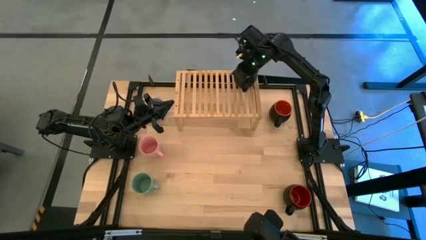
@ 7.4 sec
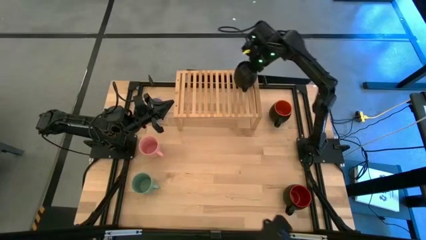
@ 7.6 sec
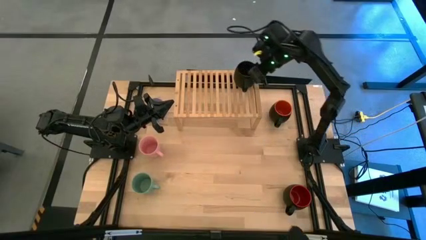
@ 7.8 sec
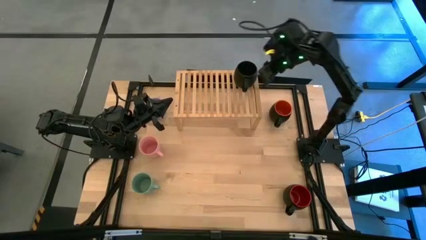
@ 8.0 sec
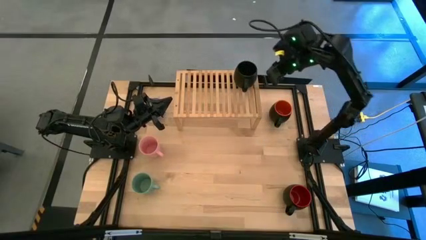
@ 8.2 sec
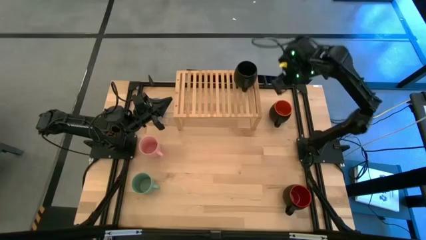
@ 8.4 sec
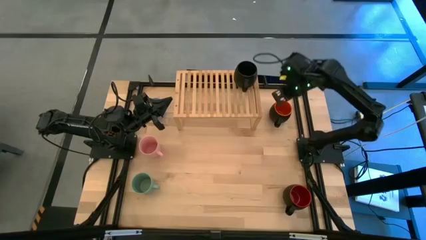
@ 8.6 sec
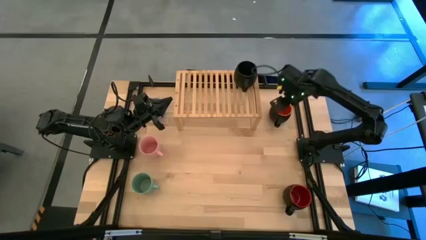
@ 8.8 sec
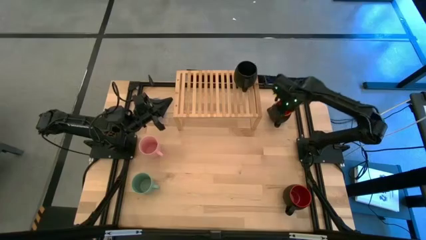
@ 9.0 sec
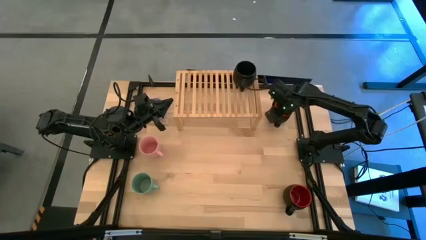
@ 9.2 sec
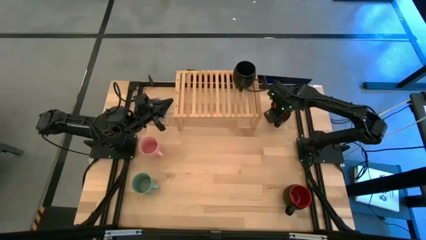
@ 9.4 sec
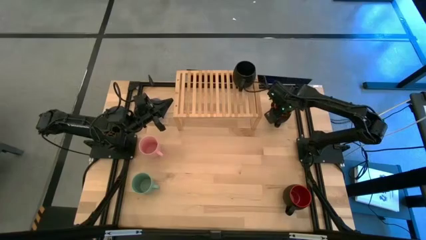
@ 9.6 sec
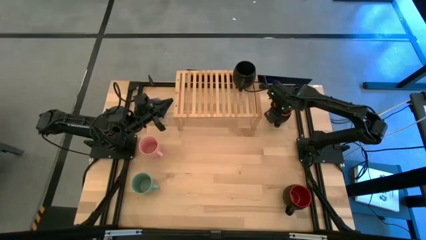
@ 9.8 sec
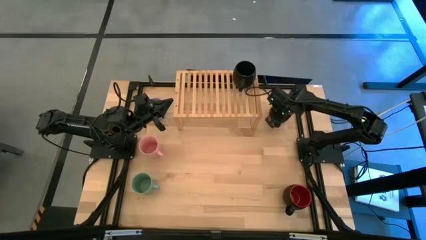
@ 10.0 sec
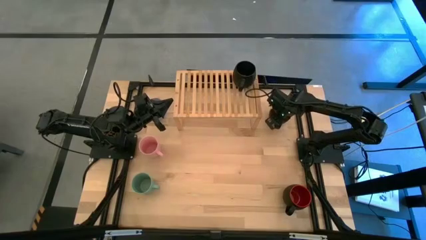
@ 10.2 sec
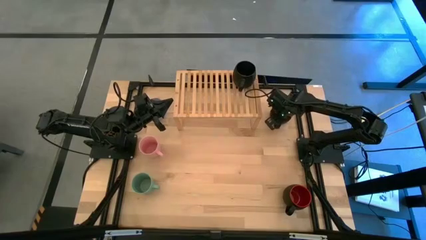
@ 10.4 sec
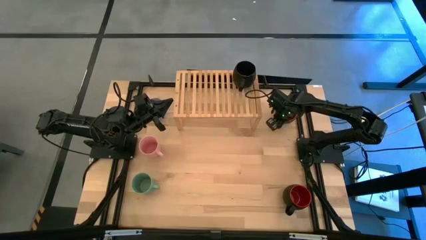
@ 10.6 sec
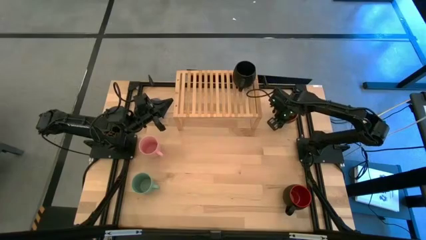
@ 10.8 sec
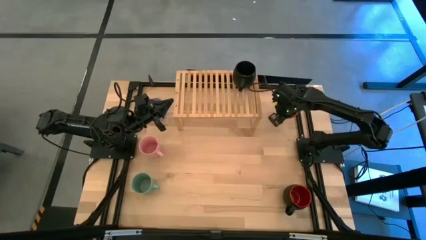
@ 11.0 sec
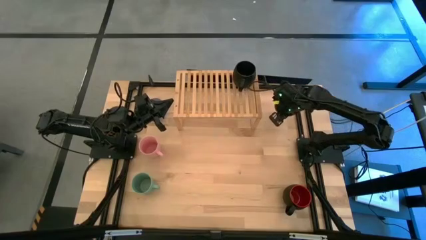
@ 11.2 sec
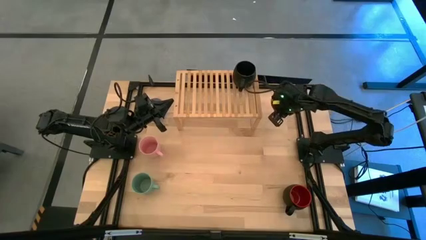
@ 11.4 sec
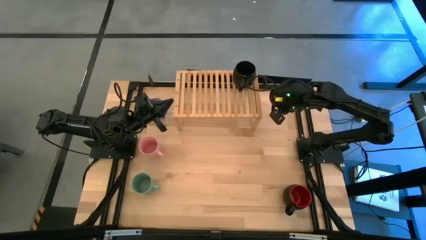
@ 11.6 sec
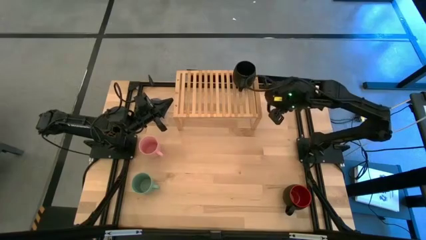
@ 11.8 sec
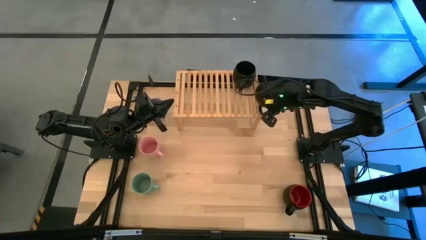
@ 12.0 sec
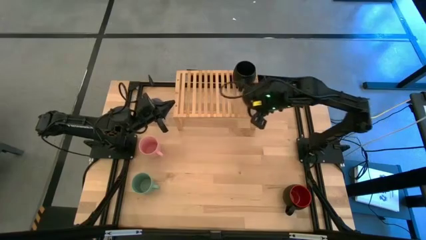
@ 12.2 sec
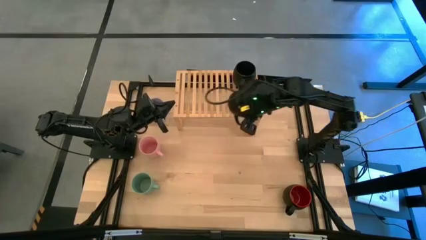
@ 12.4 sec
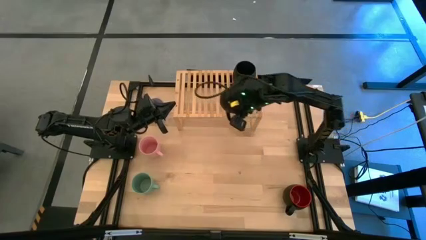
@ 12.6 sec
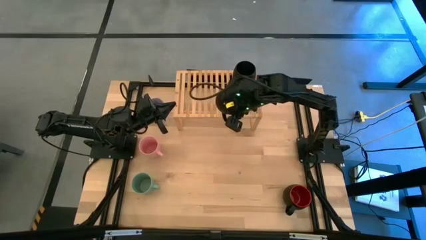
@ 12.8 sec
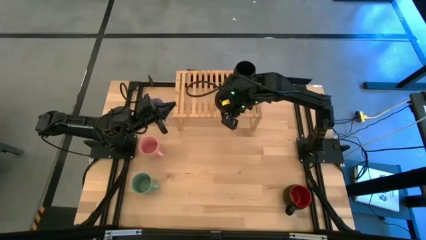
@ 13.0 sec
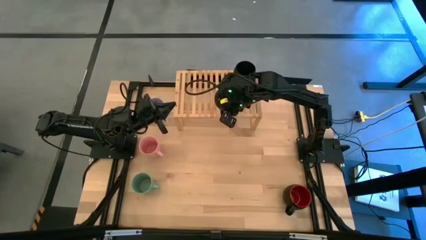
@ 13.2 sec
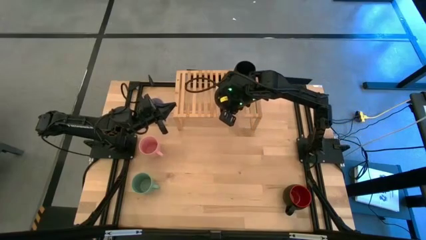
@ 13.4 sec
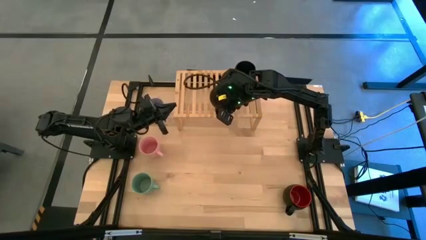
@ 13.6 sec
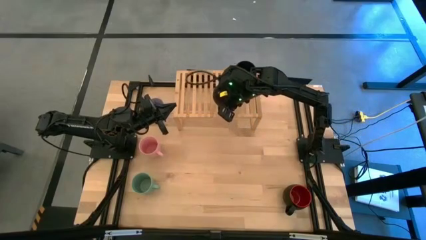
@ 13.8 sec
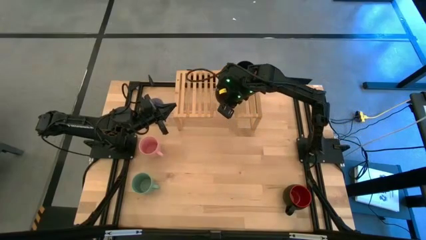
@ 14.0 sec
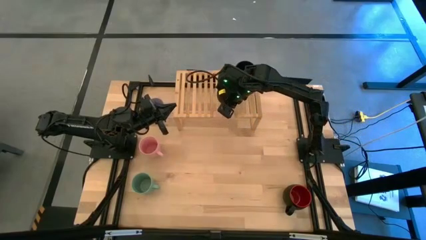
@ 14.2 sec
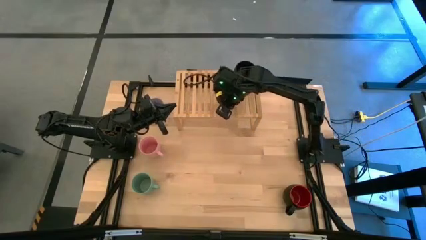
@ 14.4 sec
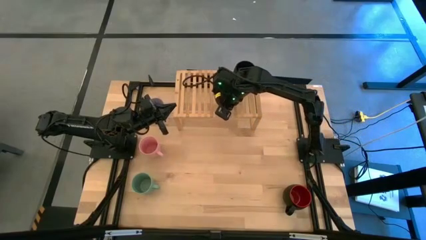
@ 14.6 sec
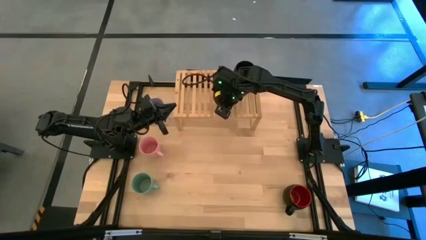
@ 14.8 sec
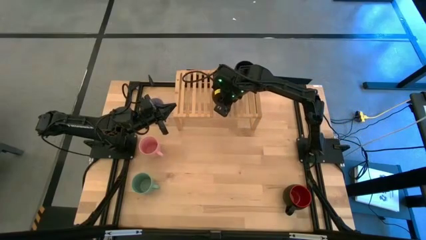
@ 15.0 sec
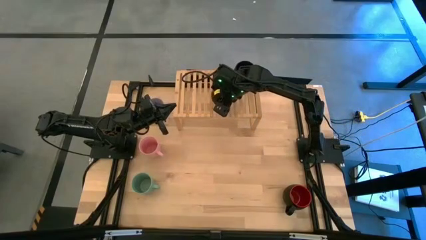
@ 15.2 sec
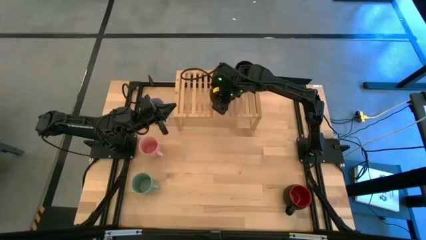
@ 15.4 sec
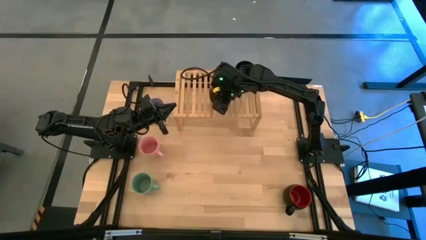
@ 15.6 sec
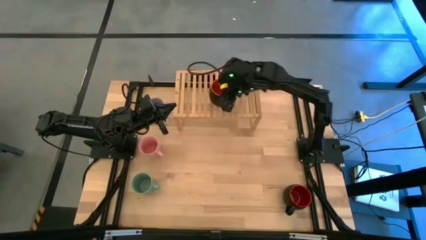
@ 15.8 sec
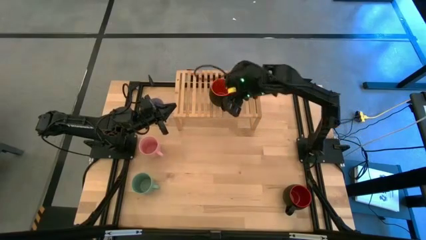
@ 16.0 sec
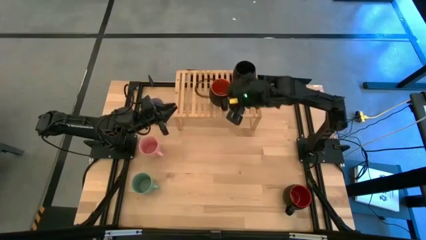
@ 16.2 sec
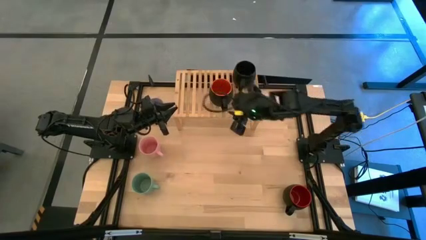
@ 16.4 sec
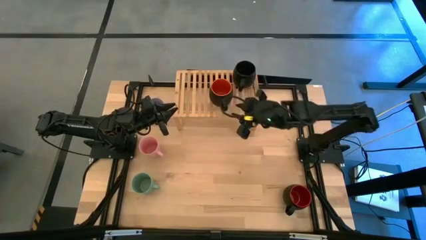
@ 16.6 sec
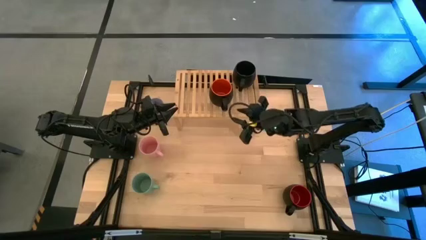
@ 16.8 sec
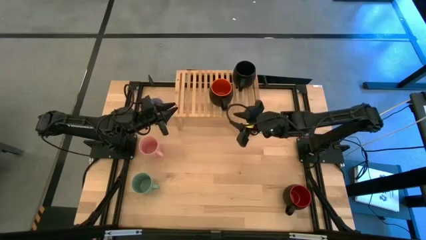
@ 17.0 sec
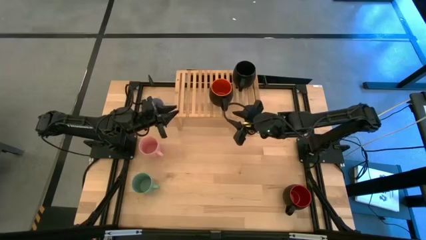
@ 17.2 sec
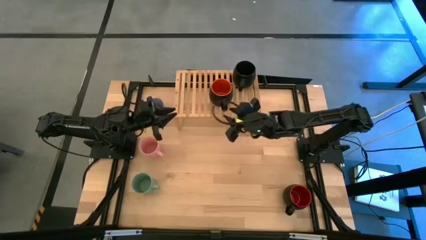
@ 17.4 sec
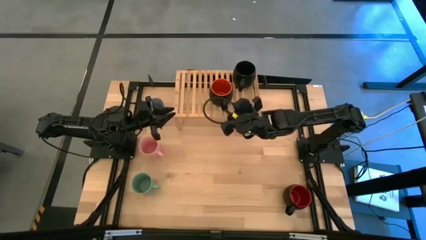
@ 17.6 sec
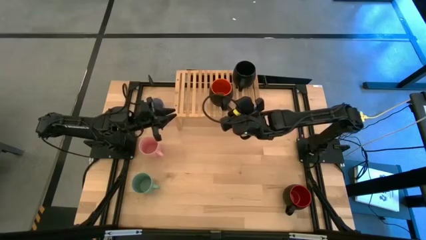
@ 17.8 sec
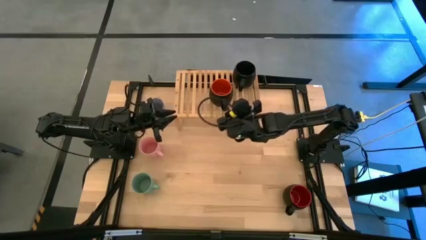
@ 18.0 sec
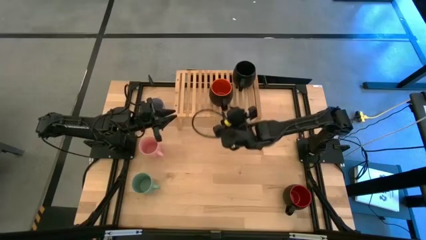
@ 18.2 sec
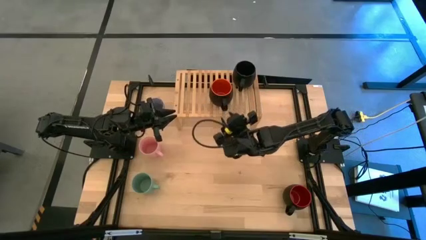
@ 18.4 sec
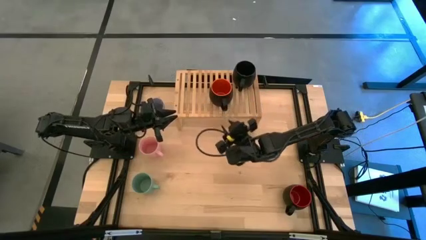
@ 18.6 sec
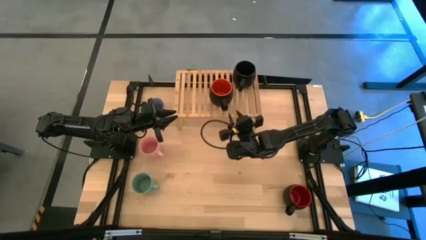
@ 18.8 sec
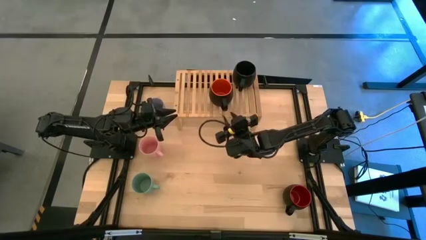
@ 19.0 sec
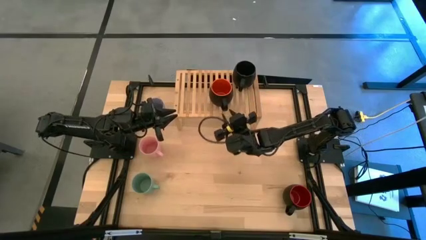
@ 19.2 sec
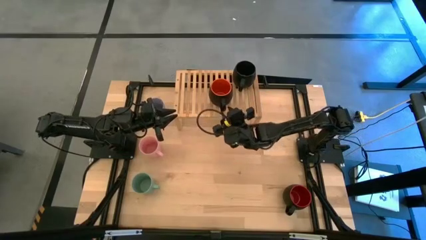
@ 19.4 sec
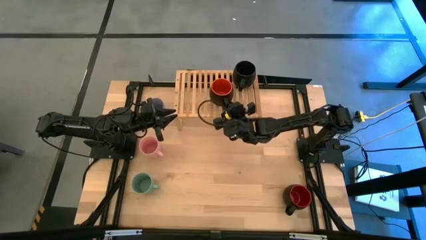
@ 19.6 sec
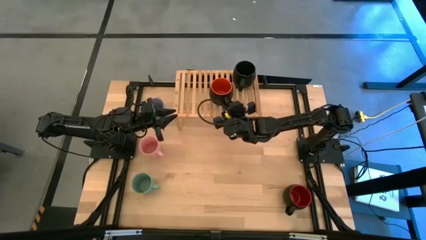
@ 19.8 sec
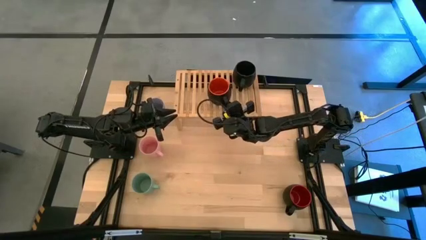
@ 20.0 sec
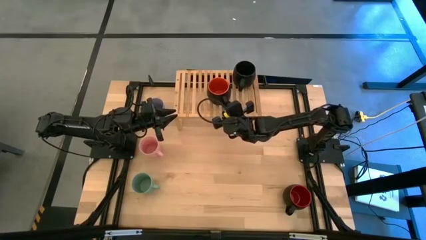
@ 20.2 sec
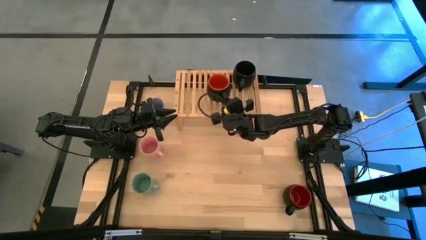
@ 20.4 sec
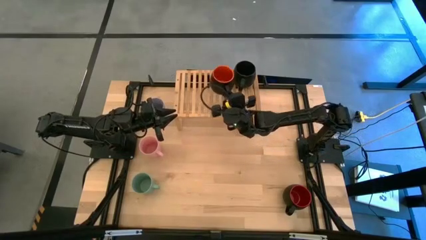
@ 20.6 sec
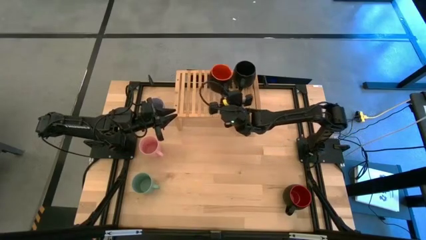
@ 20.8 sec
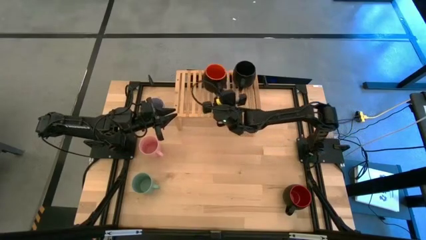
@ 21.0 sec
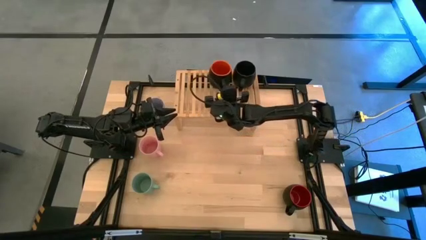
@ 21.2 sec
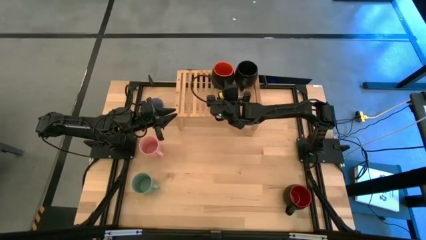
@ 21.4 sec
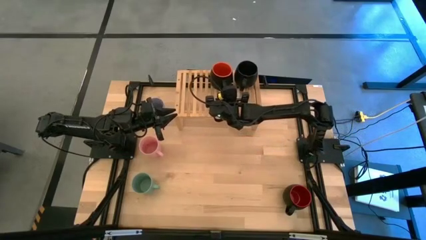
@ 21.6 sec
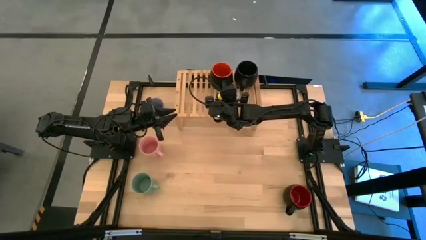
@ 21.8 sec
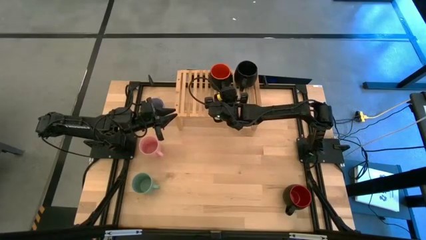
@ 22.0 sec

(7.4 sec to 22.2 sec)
Task: Place coffee mugs
Put the orange mug on the shelf
